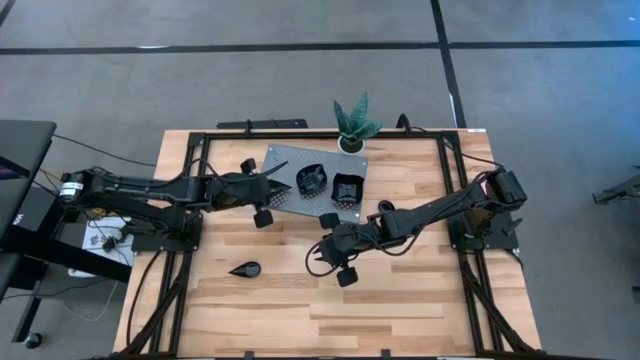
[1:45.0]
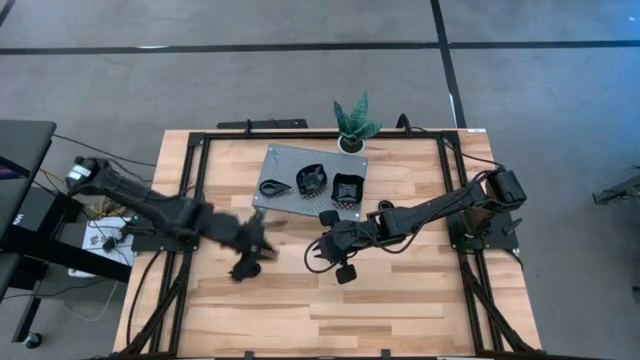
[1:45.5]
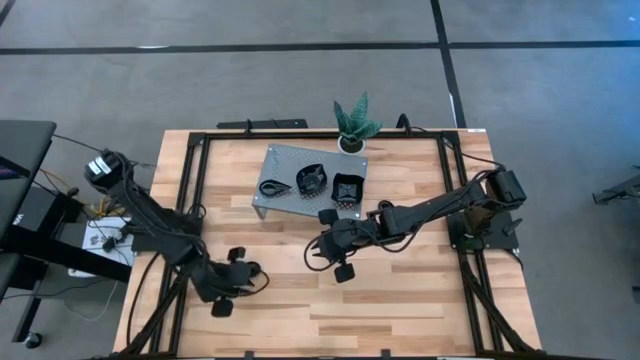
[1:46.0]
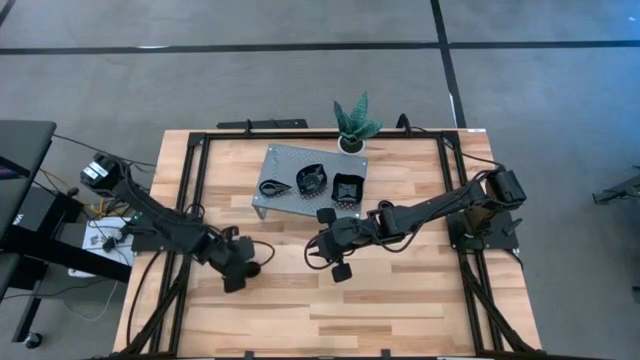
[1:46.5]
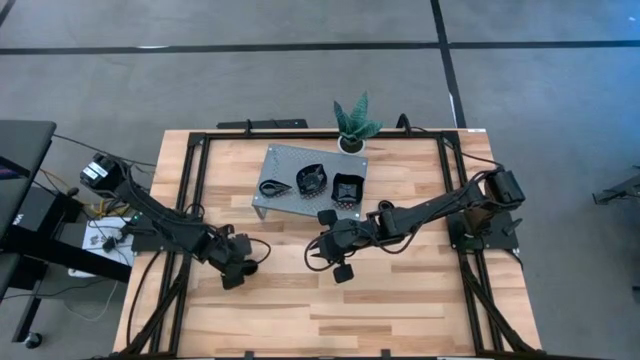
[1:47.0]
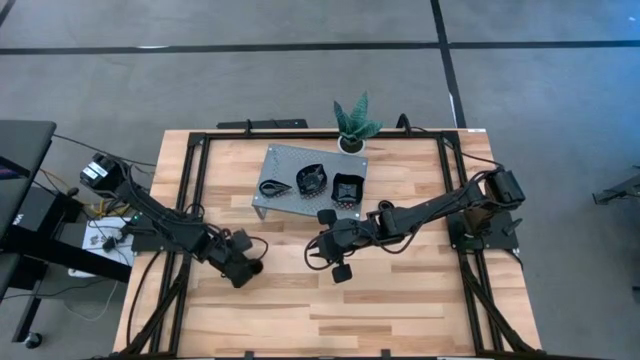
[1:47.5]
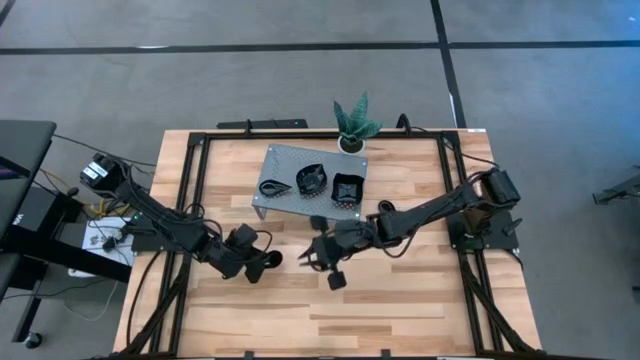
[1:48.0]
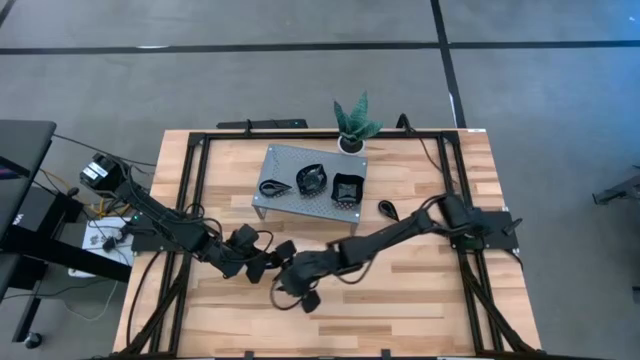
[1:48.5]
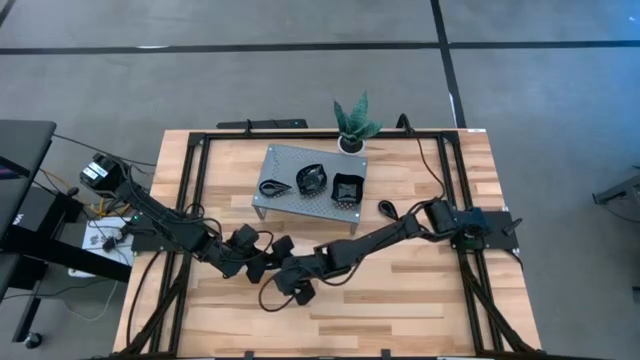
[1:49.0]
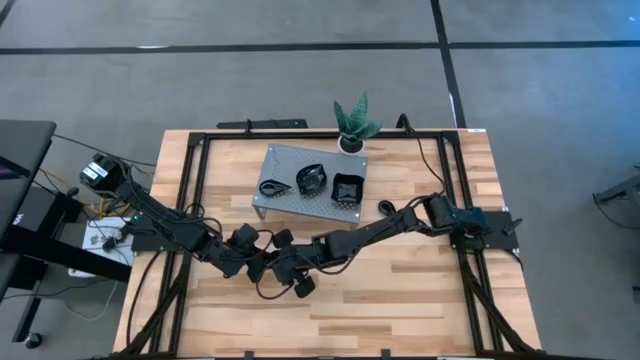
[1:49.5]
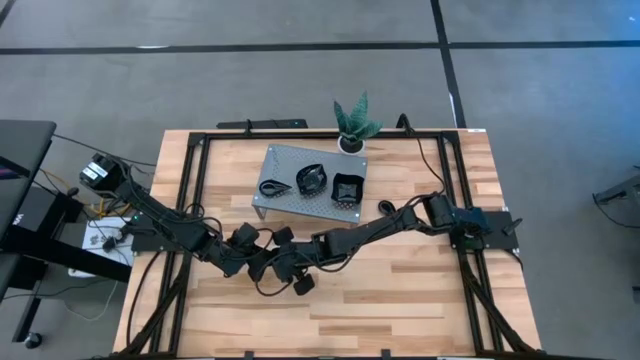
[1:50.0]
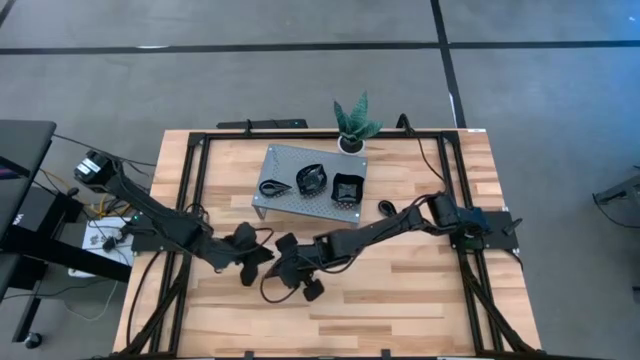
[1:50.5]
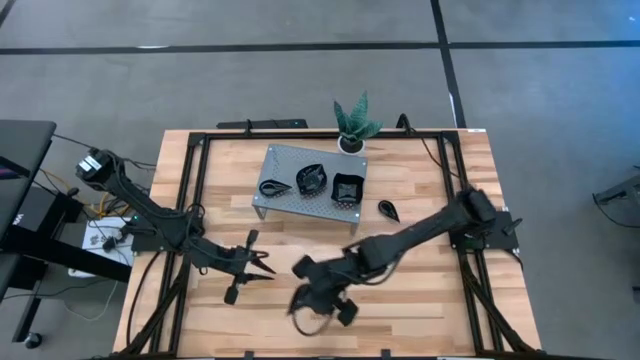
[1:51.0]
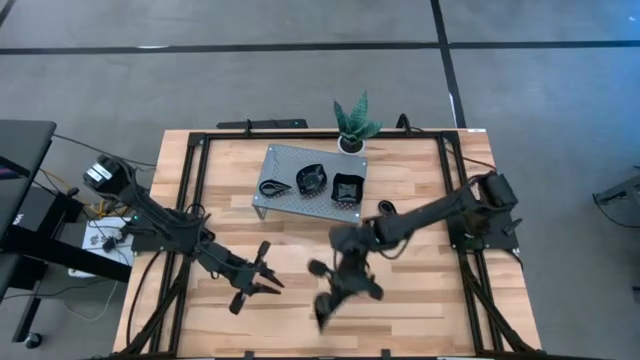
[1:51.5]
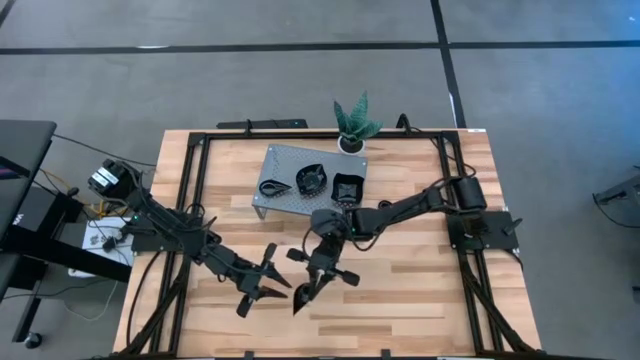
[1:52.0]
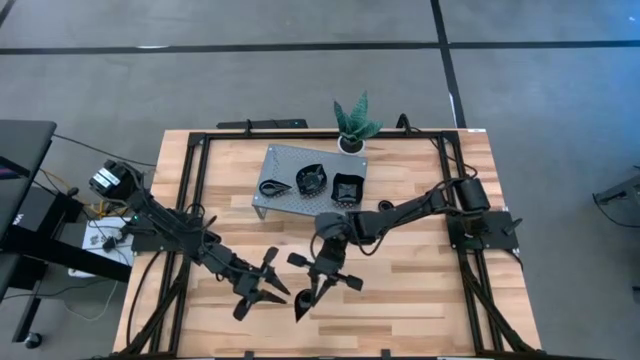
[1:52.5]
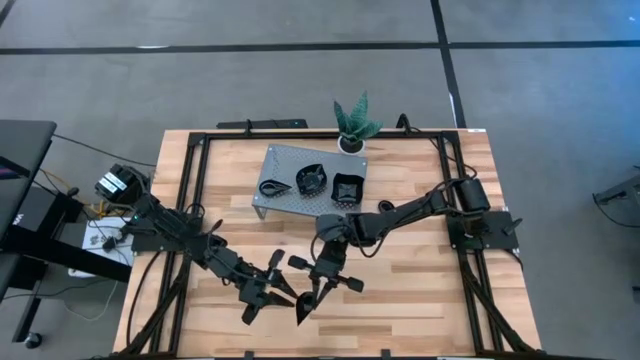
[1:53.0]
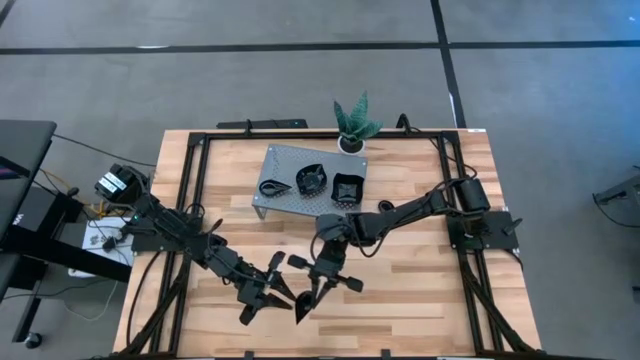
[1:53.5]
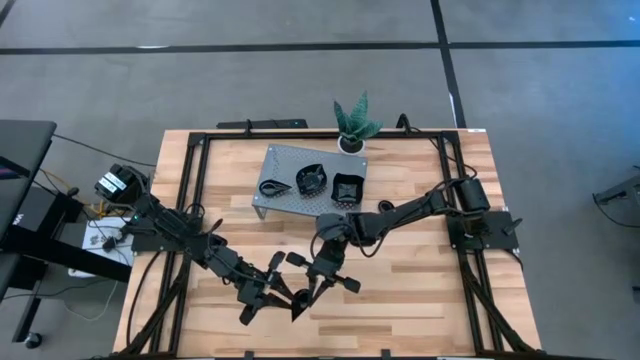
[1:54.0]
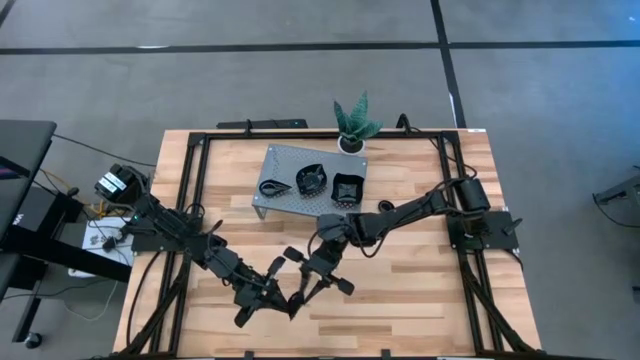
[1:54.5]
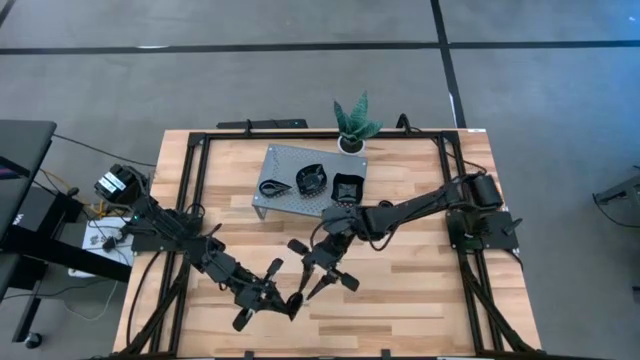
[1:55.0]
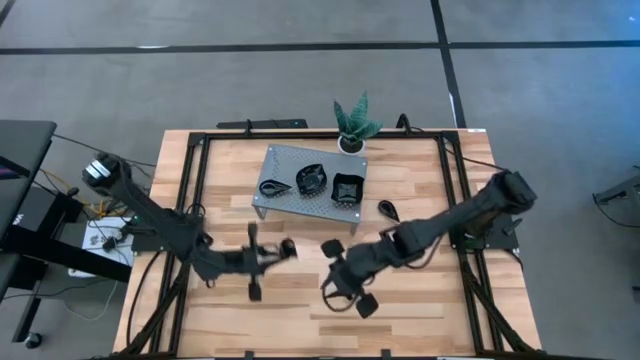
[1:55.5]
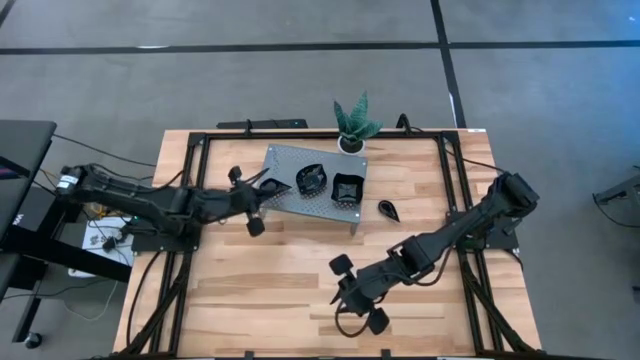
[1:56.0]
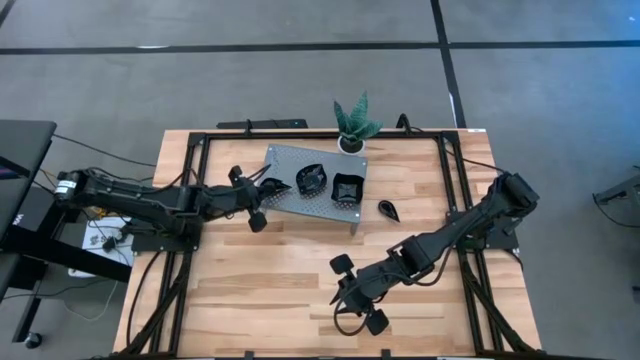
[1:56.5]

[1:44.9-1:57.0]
Task: Pick & Place Mini shaped plates
Stack the drop shaped plate on top of the drop shaped plates on the shelf

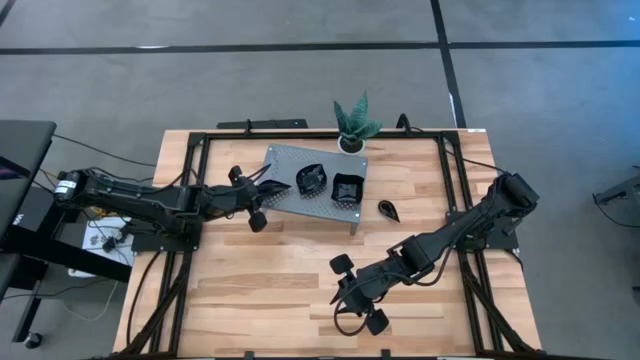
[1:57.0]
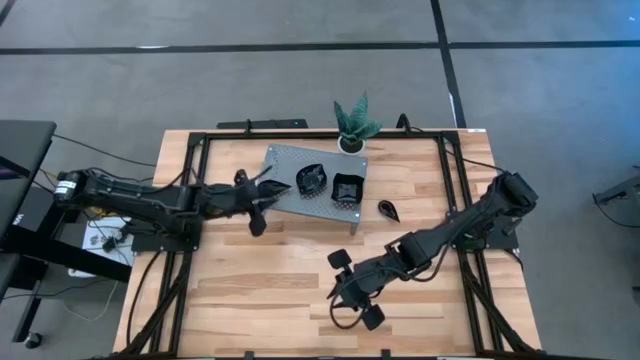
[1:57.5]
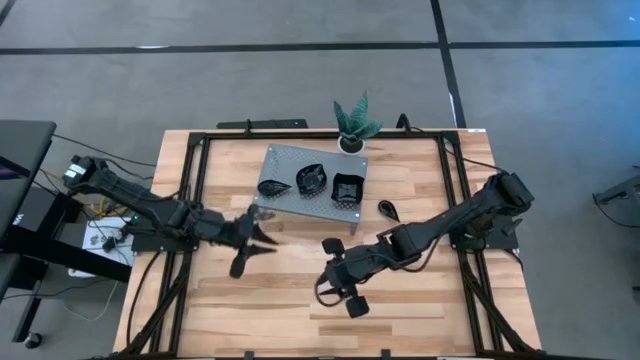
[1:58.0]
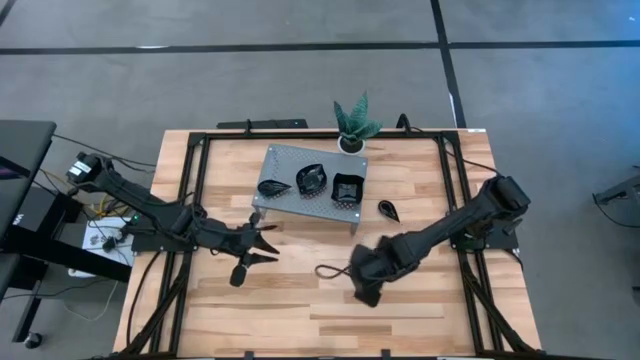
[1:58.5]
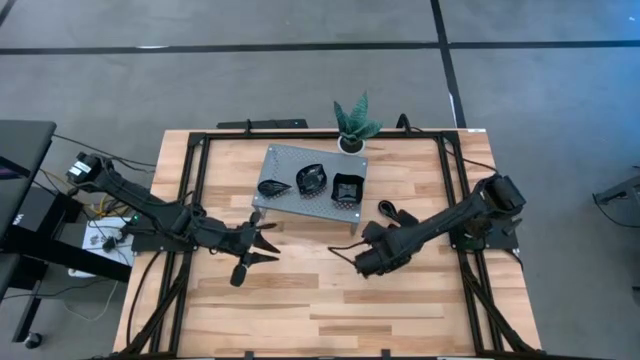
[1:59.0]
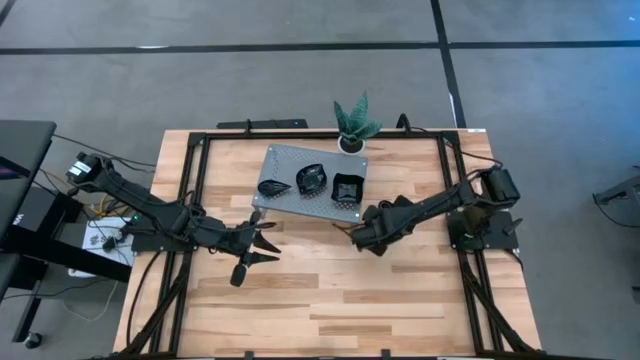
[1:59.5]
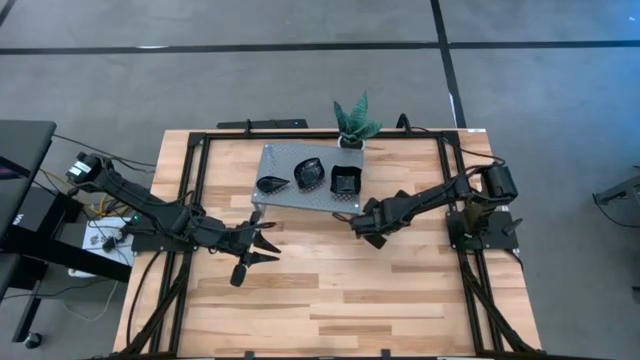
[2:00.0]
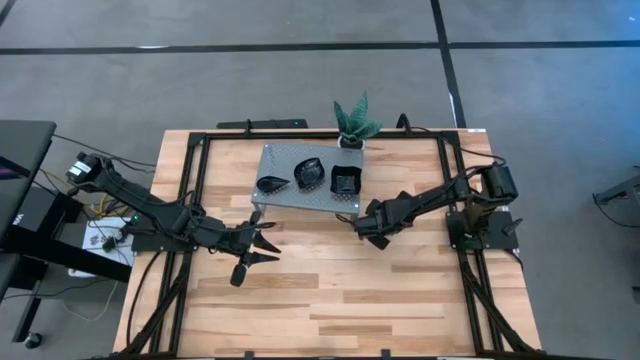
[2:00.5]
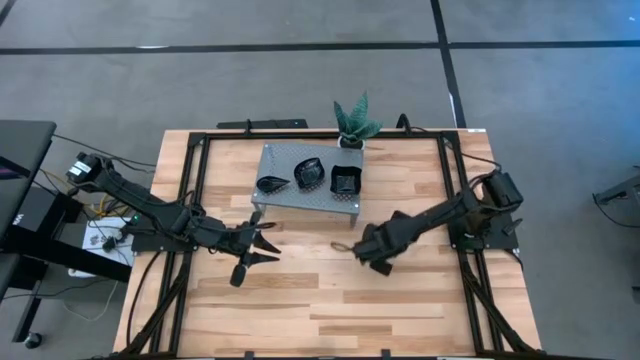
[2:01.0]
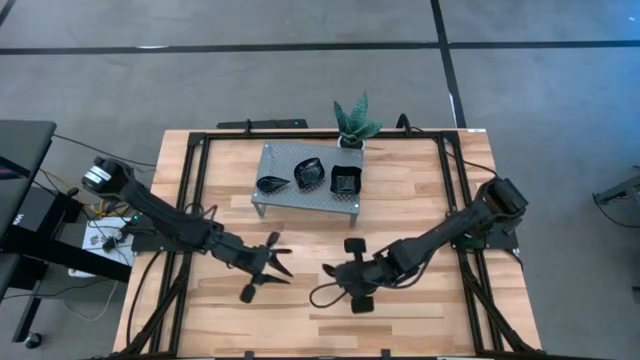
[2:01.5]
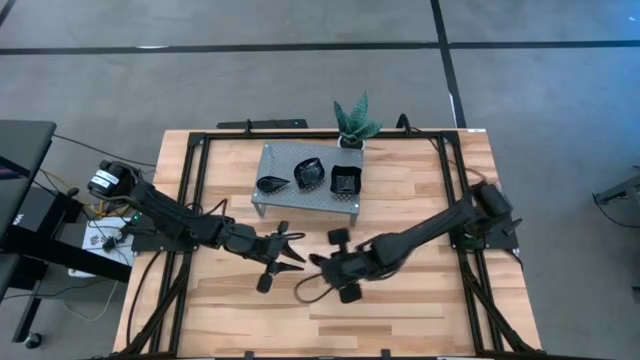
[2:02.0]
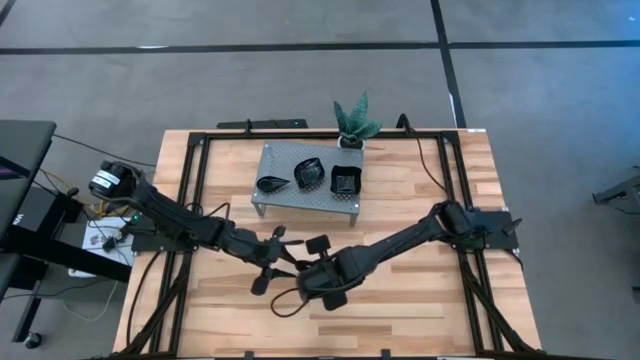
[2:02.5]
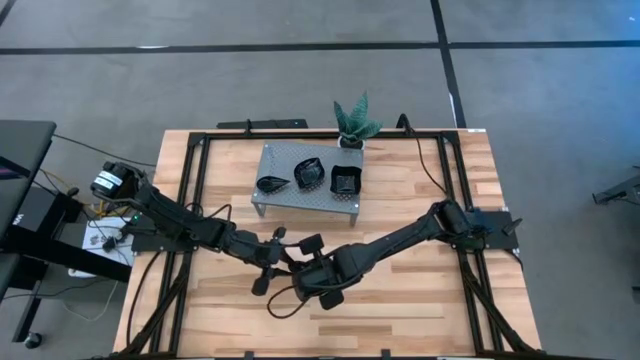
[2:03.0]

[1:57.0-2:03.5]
Stack the drop shaped plate on top of the drop shaped plates on the shelf

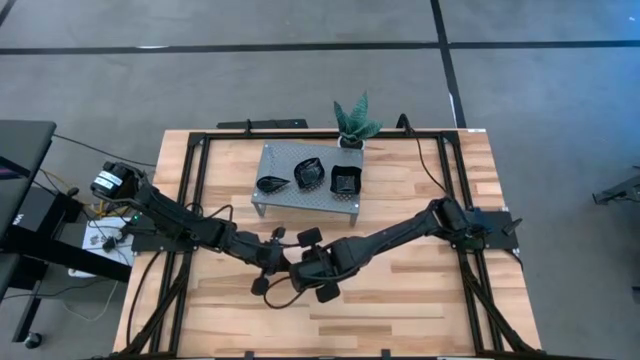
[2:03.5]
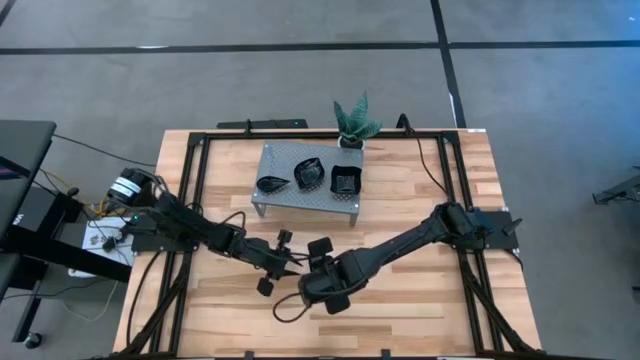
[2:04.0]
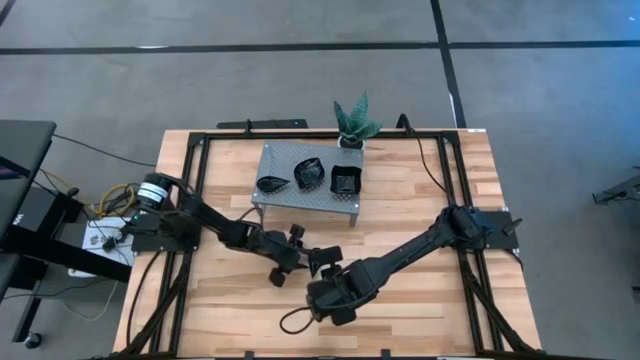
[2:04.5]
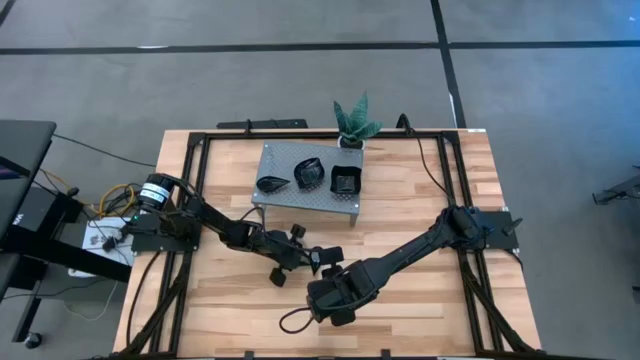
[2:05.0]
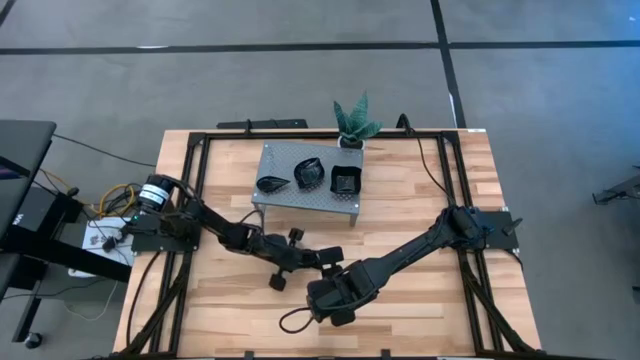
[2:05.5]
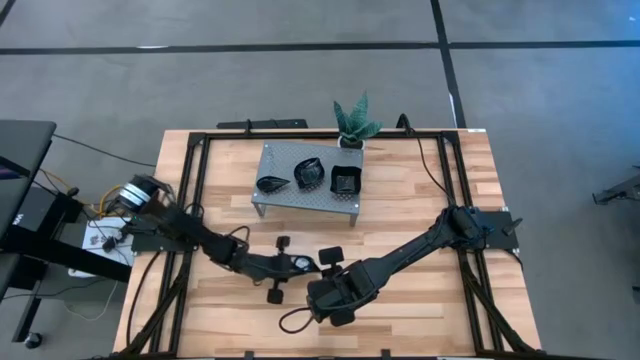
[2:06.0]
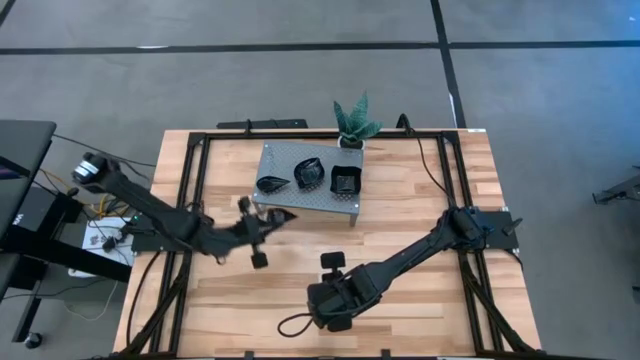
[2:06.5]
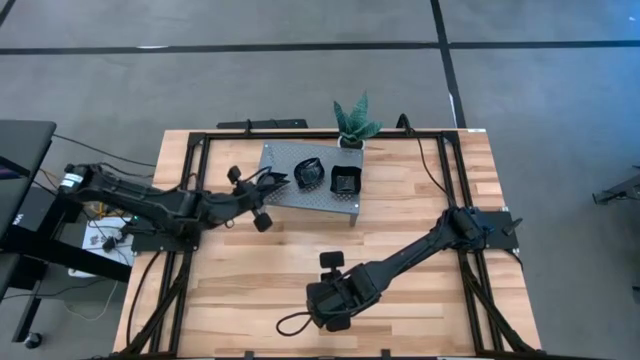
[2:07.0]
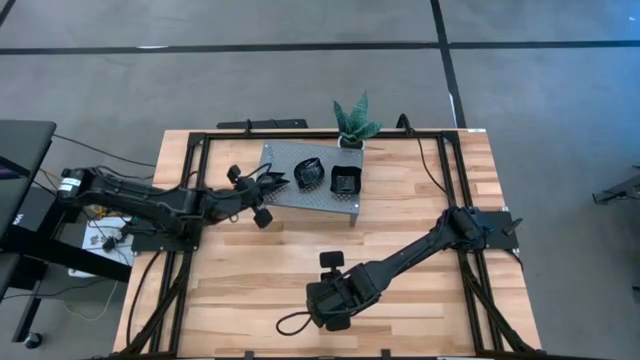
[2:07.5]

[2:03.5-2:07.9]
Stack the drop shaped plate on top of the drop shaped plates on the shelf
